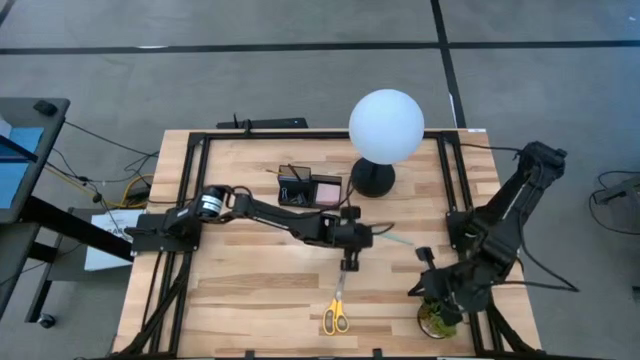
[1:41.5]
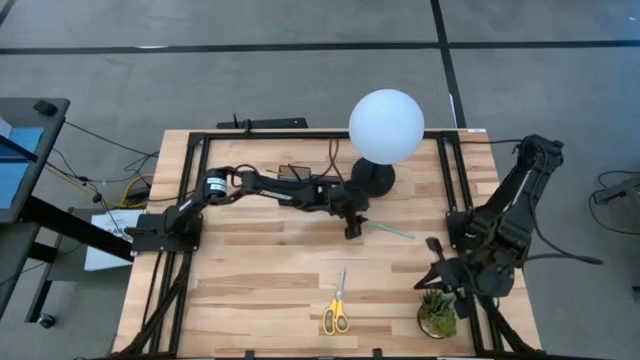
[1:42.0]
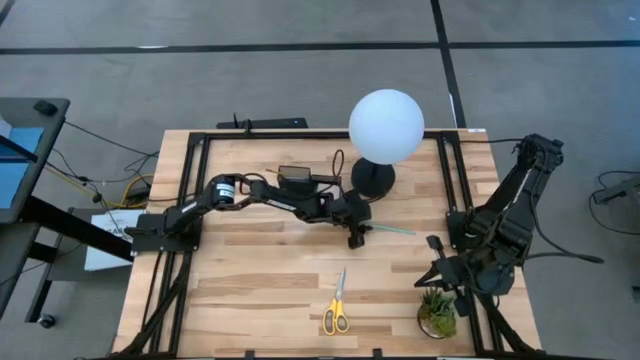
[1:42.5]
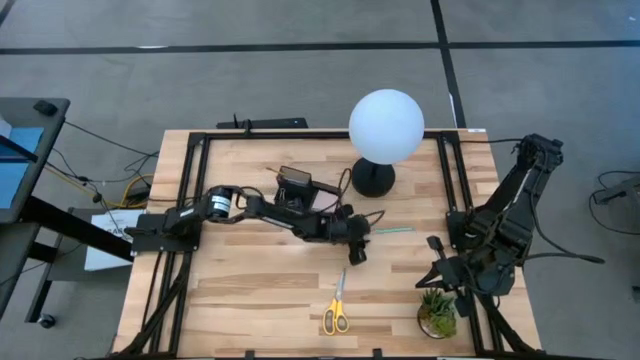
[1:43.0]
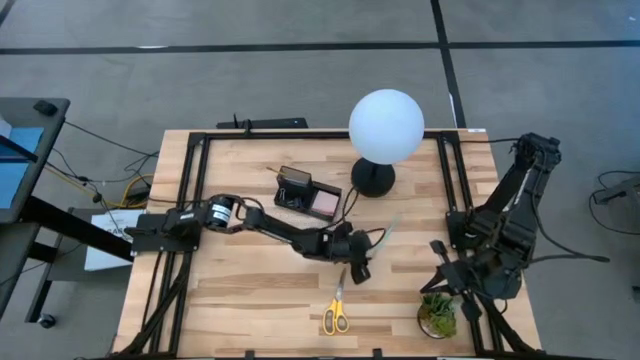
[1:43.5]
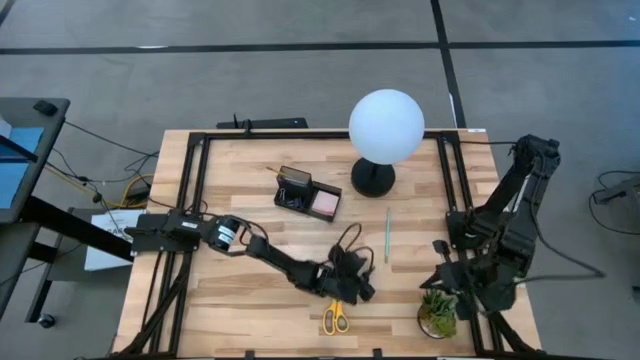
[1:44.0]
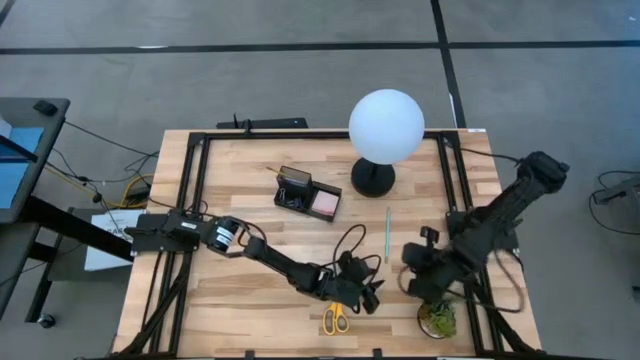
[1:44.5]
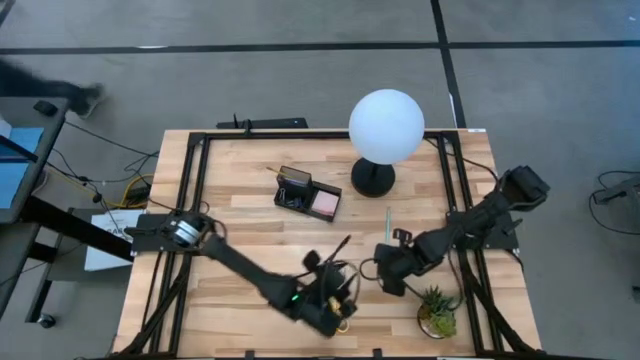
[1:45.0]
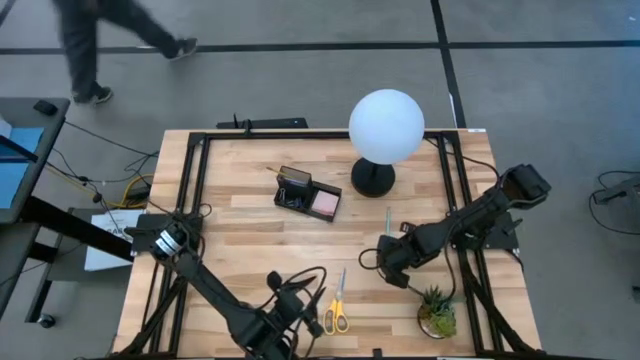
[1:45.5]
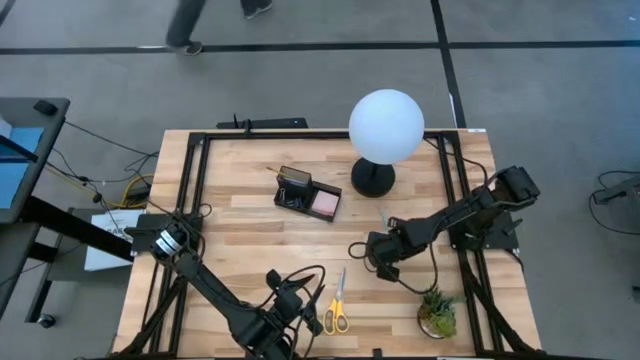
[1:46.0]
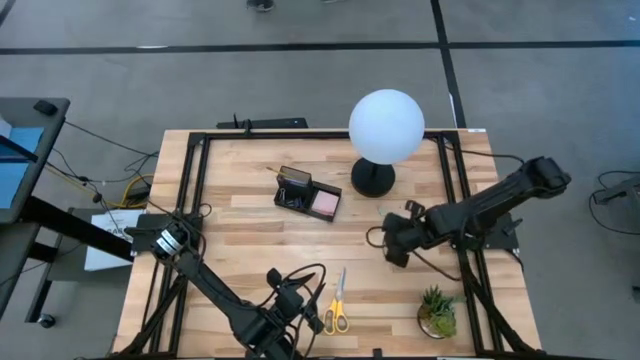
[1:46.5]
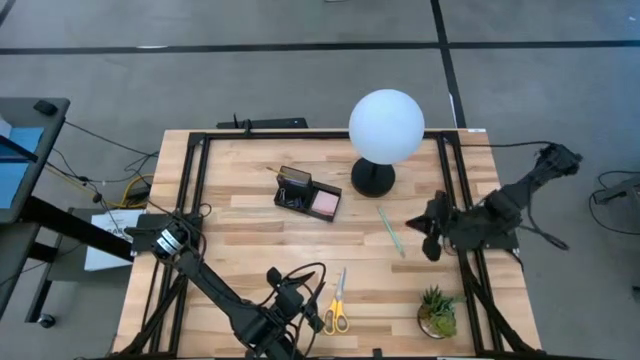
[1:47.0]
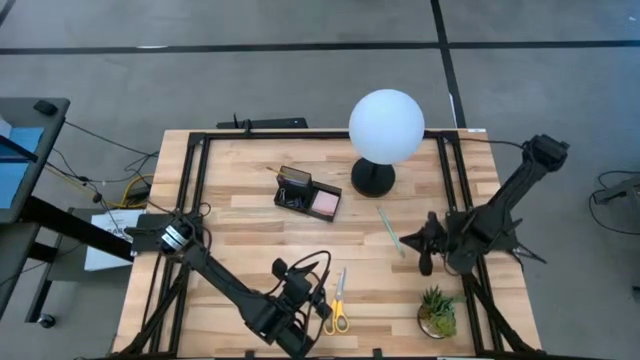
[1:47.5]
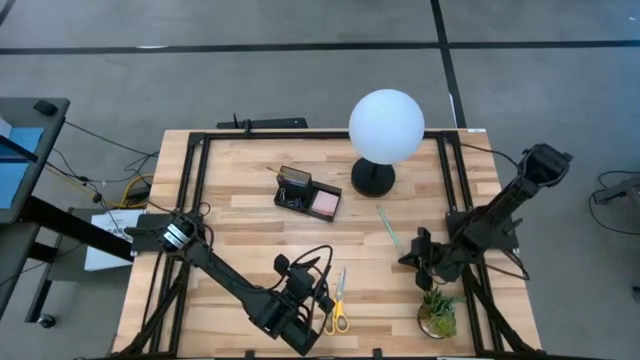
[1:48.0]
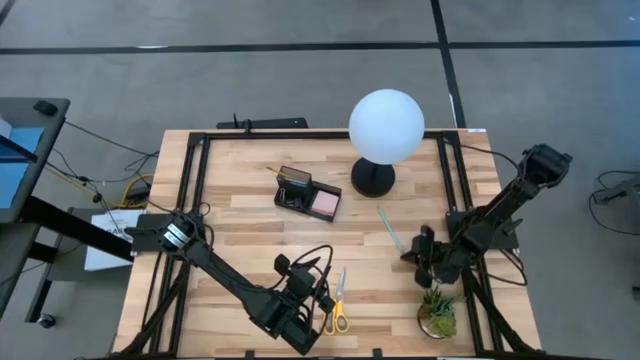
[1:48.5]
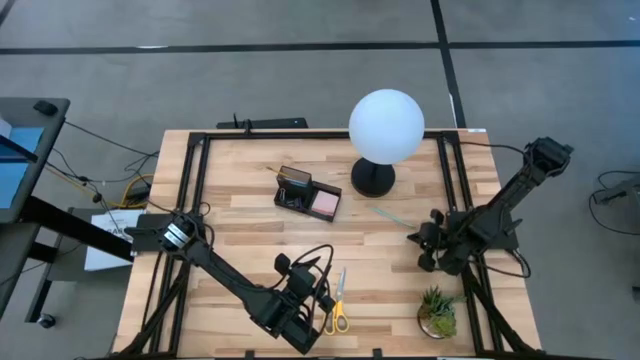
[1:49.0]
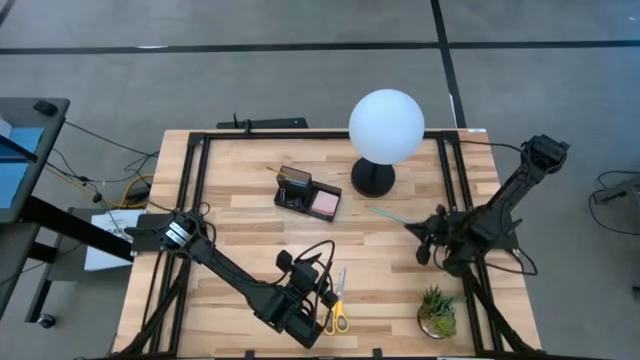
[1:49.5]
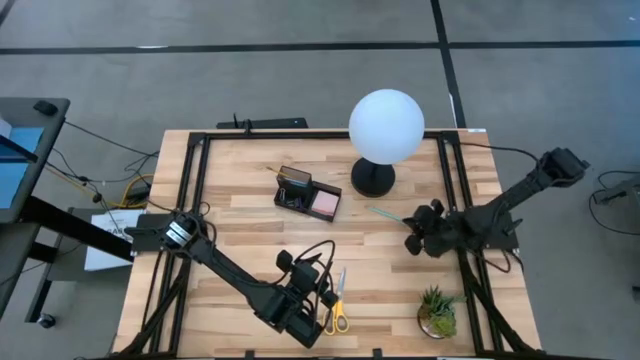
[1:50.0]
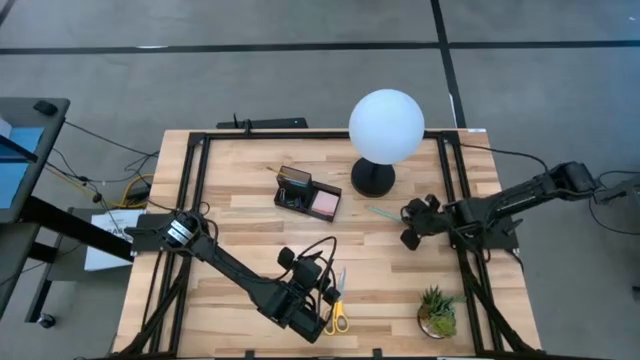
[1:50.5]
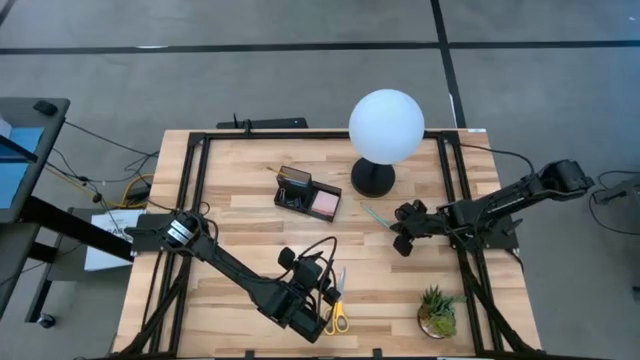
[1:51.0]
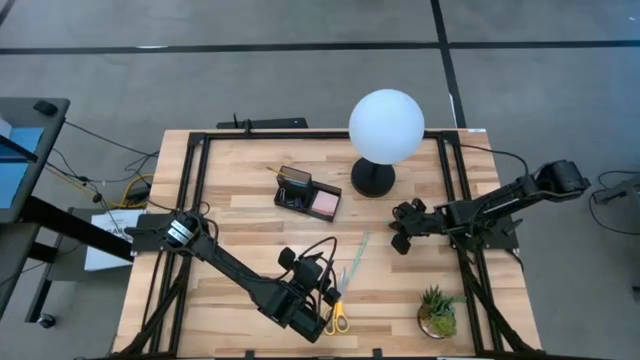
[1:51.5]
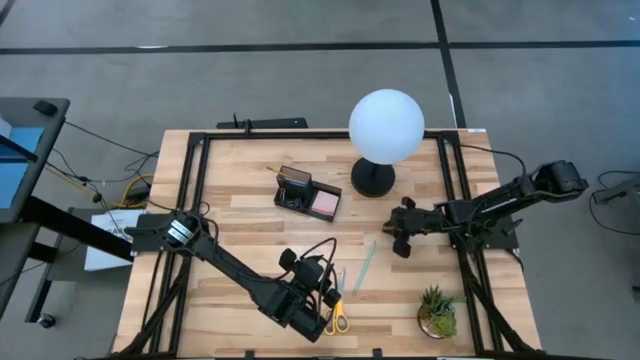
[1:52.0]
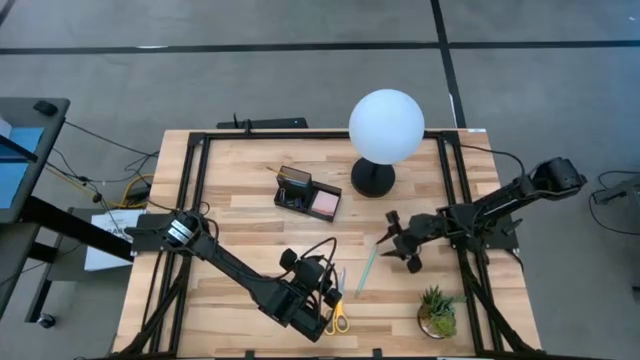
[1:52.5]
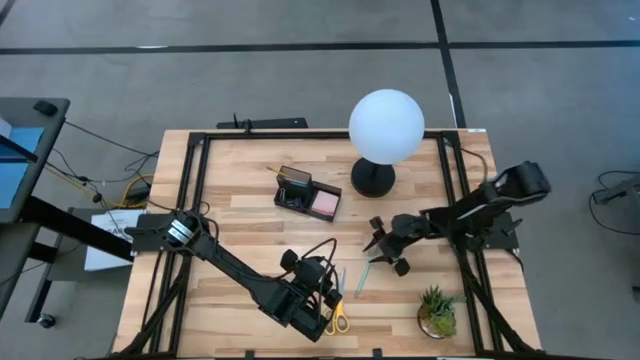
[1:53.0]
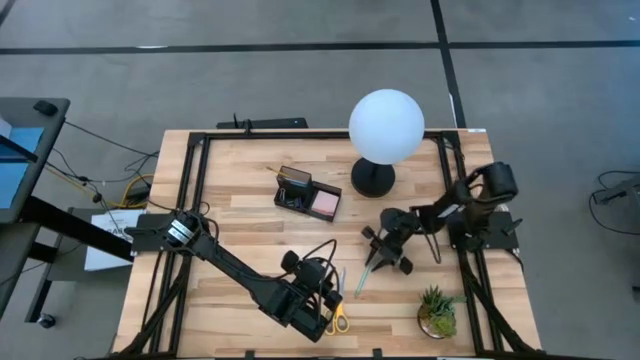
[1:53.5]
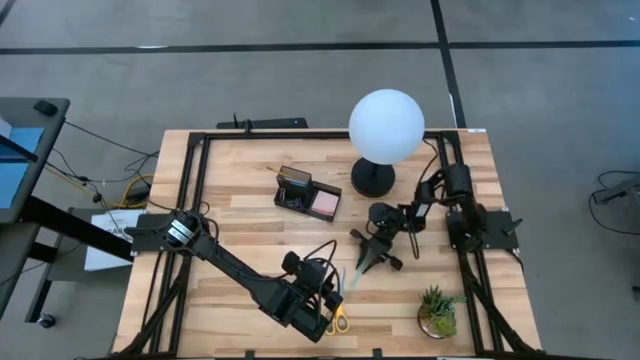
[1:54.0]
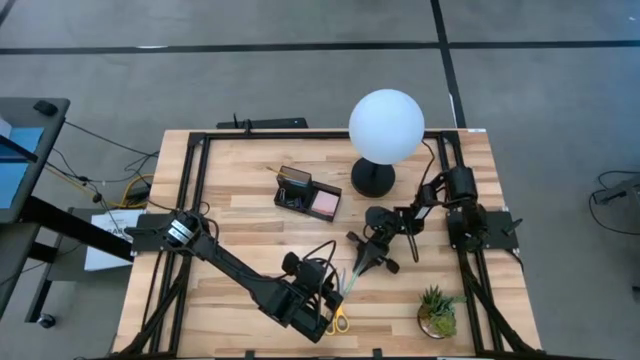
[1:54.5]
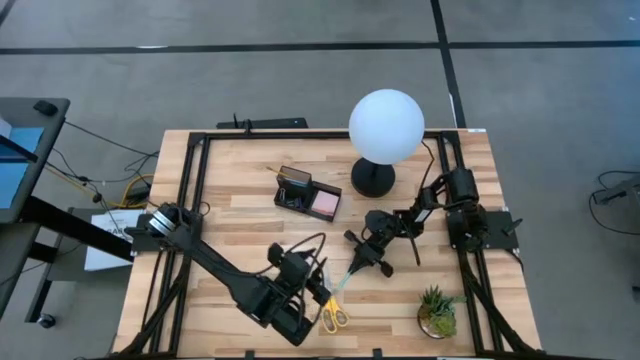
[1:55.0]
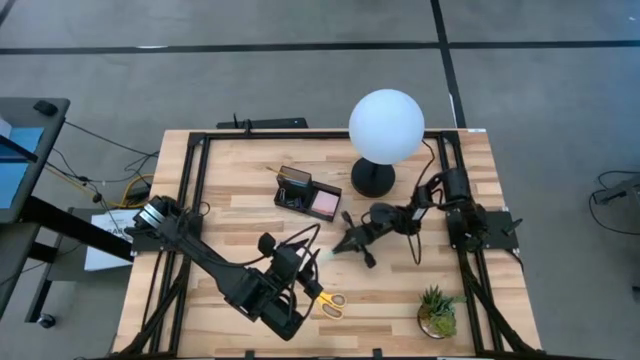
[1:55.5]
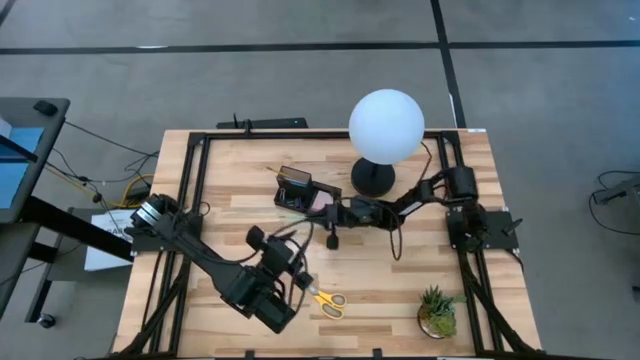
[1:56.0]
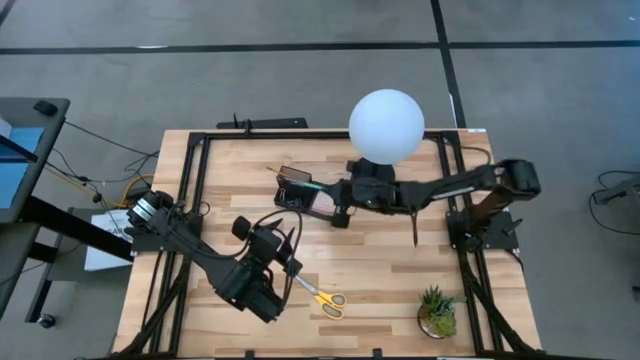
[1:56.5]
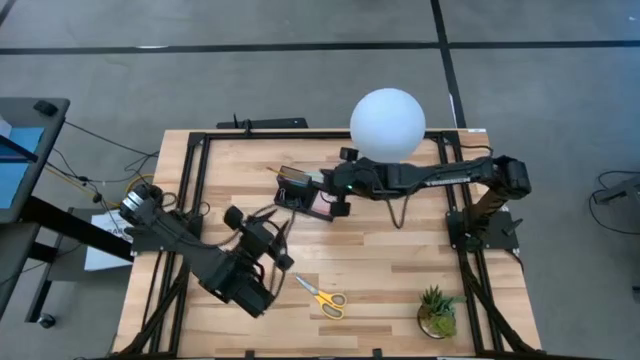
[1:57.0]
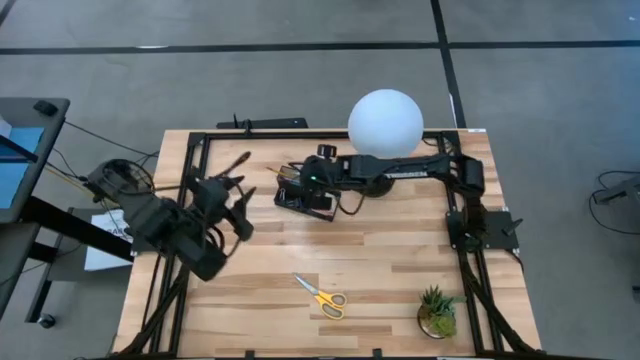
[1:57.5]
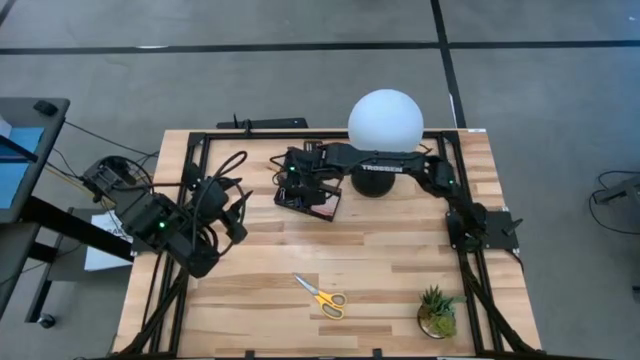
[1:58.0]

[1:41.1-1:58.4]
Task: Pick and place office supplies into organizer
Put the blue pencil into the black desk organizer

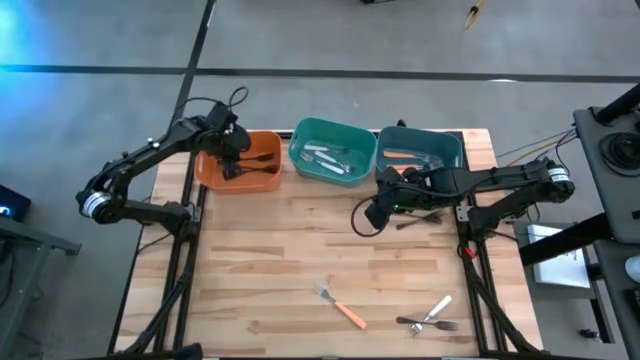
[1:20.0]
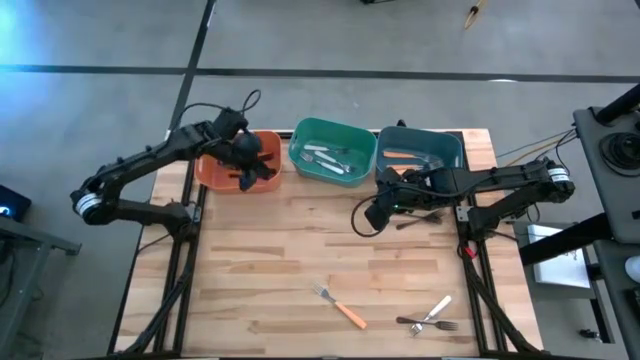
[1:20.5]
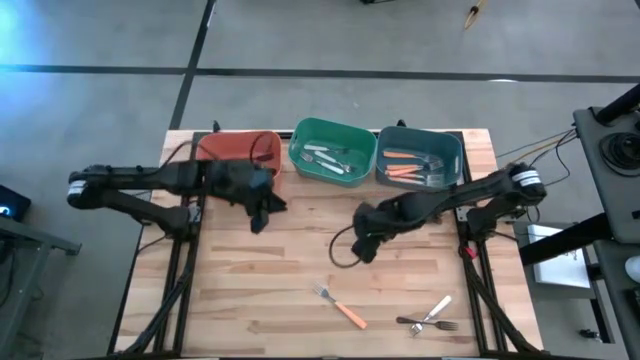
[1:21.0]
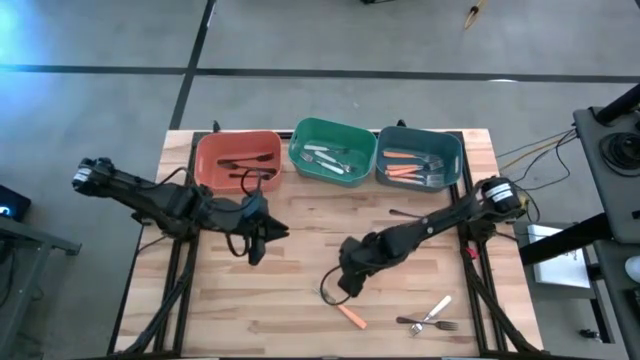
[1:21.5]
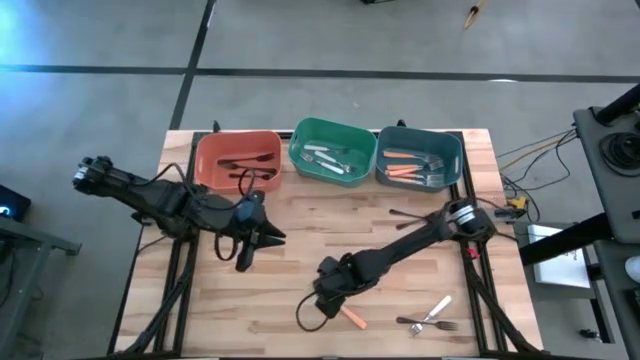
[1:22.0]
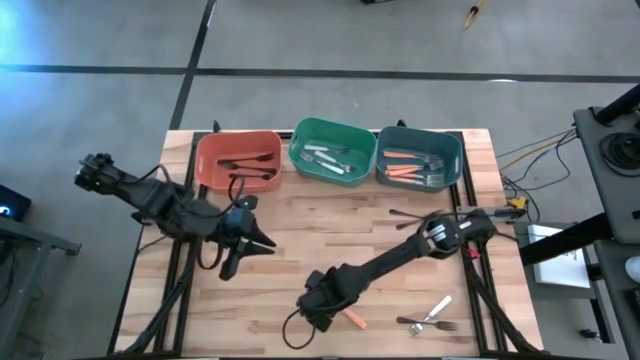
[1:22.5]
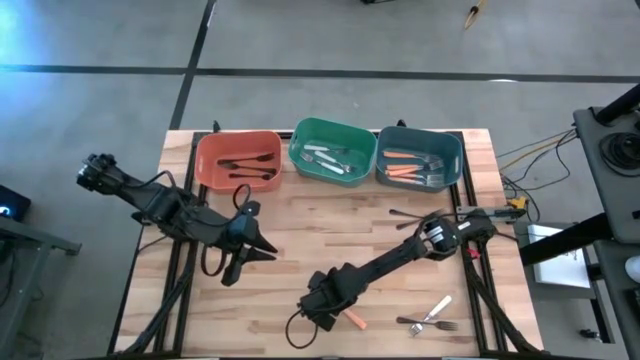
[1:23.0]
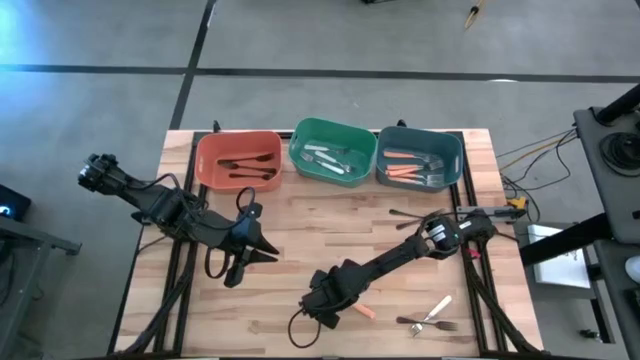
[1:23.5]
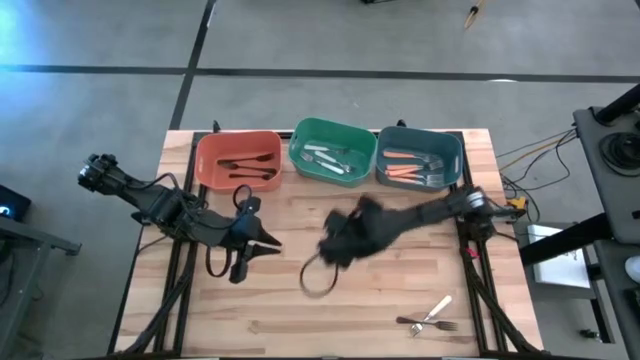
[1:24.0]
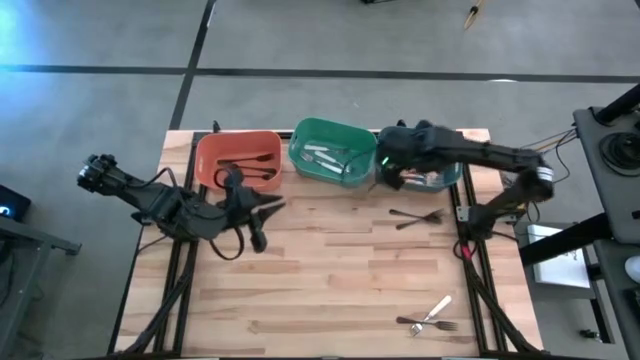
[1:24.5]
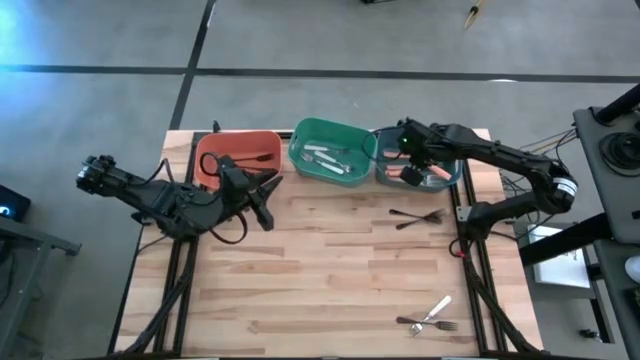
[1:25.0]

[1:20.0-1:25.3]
Task: Sort silverware by color (type)
Put the light orange fork into the blue bin
